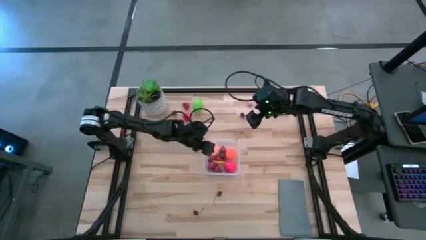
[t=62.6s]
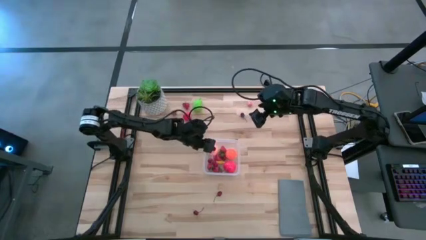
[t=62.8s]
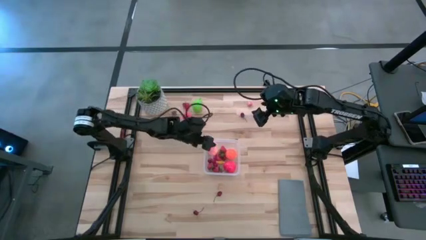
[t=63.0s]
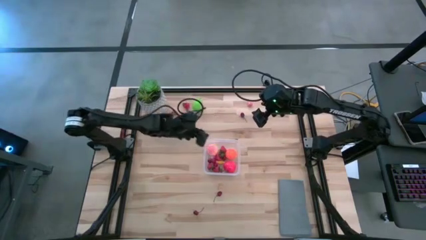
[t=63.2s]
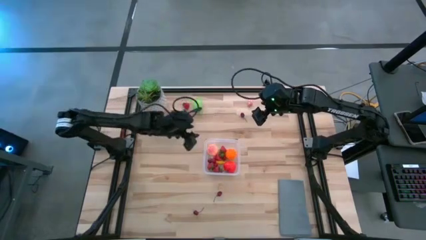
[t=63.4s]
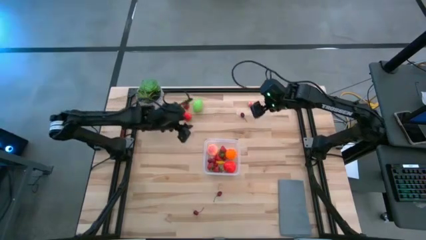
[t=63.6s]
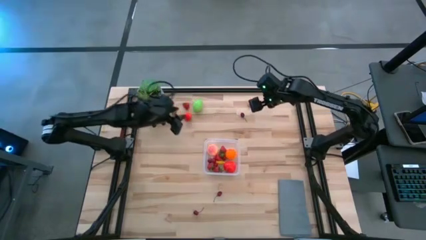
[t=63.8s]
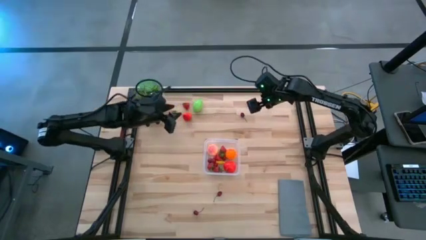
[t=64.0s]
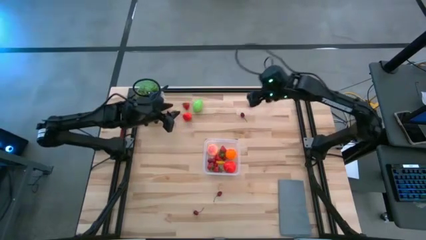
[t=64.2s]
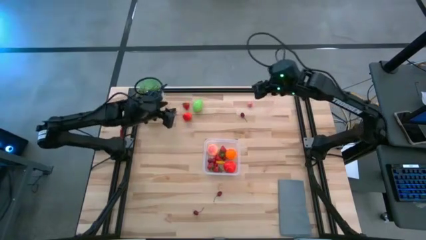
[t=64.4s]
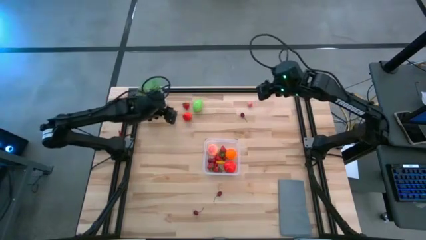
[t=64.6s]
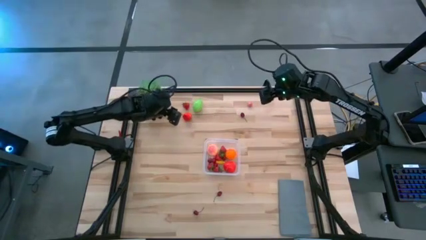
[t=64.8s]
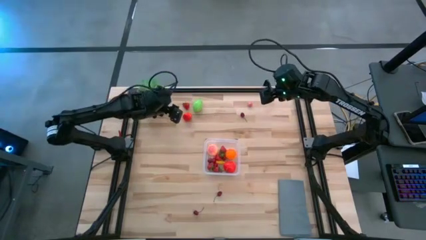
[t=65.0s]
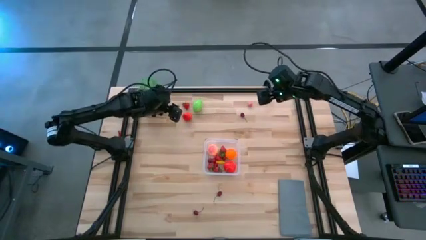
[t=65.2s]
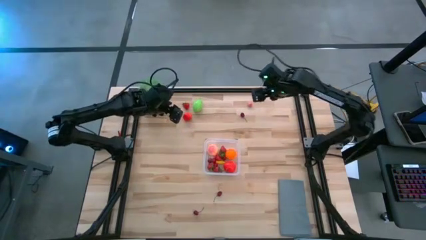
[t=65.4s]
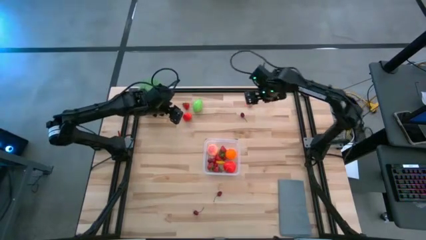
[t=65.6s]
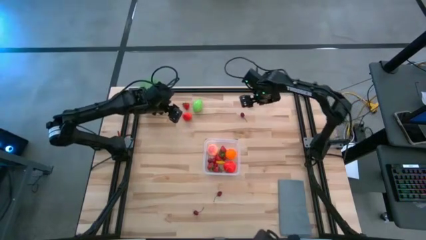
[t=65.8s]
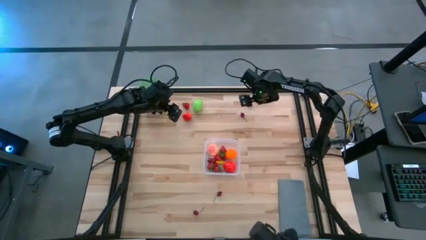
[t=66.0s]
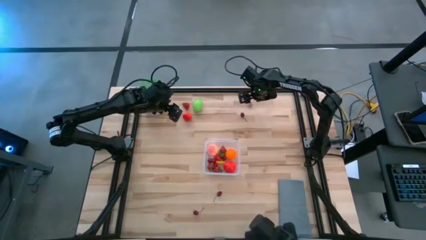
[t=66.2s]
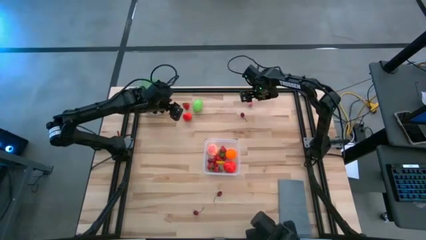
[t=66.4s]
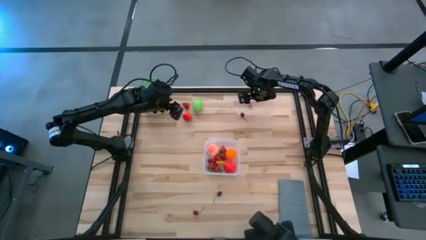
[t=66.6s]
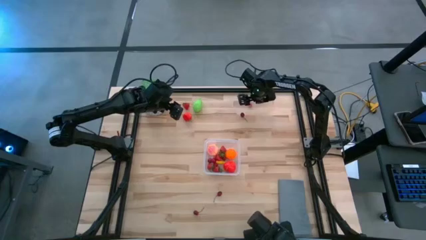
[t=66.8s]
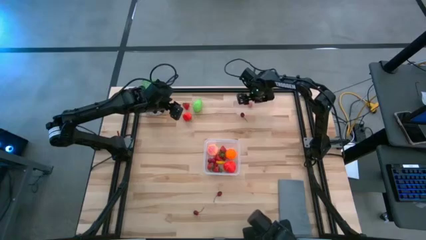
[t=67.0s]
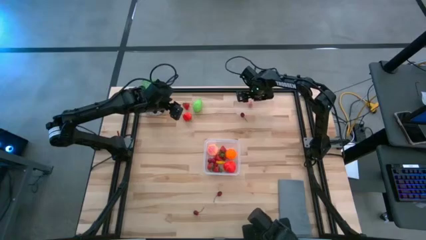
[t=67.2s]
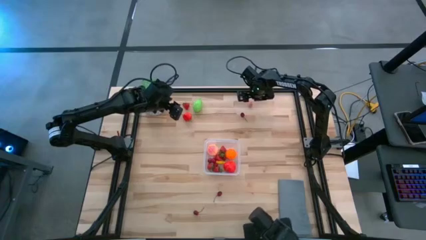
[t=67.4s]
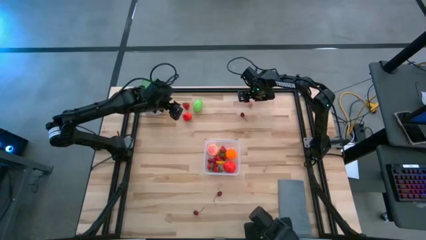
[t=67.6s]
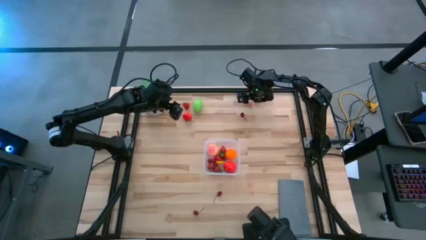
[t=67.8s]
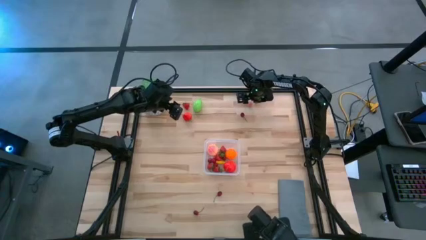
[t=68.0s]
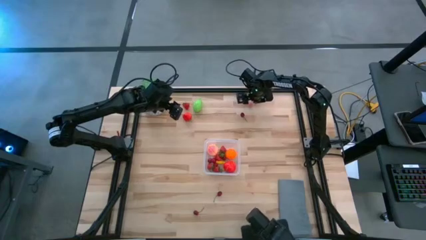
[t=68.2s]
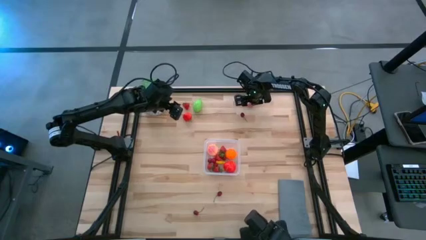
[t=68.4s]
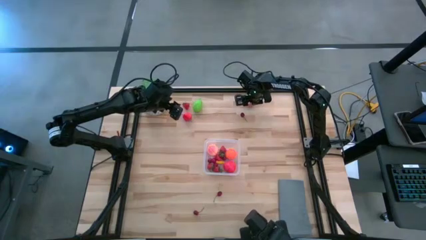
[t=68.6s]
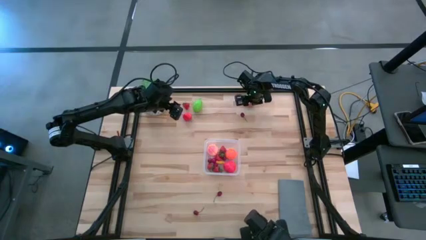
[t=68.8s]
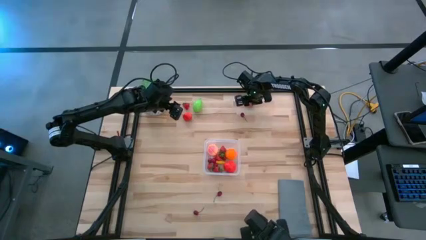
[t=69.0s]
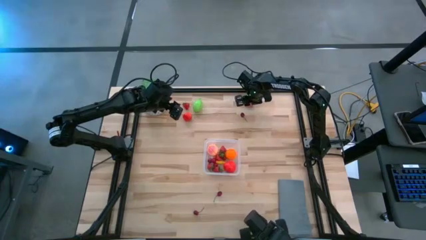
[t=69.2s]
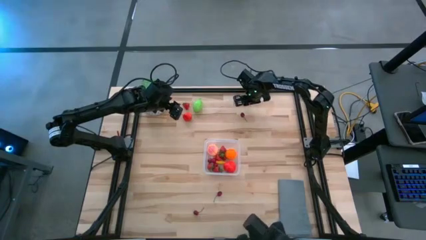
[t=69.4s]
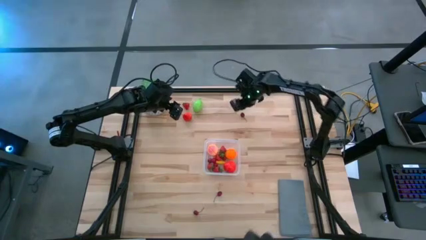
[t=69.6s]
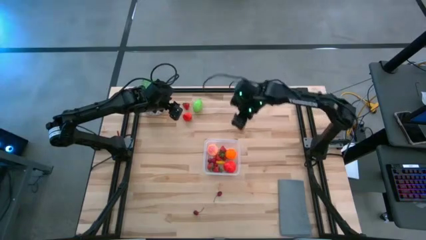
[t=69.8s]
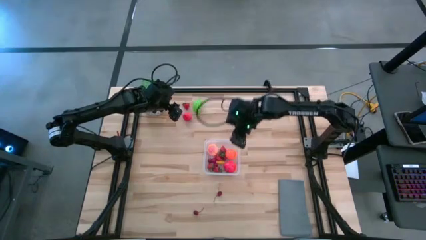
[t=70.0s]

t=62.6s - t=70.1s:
Task: Pick and placing Produce into tupperware
Put the pink peach into the transparent container

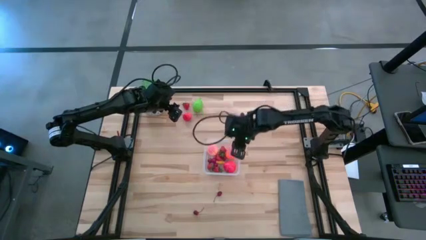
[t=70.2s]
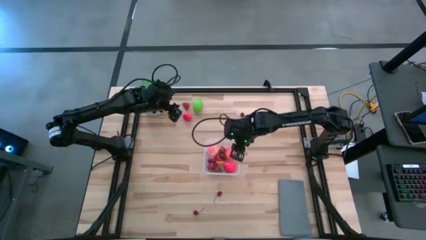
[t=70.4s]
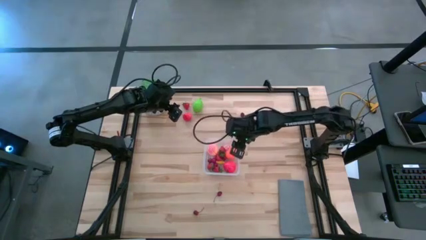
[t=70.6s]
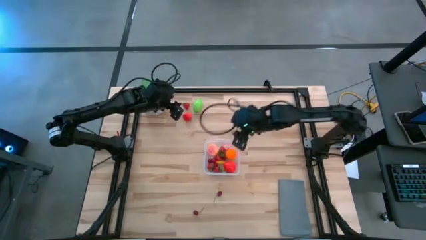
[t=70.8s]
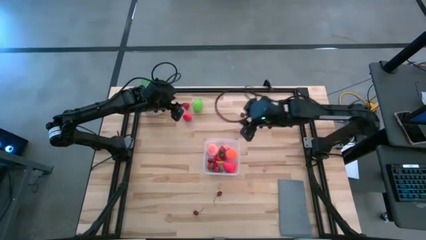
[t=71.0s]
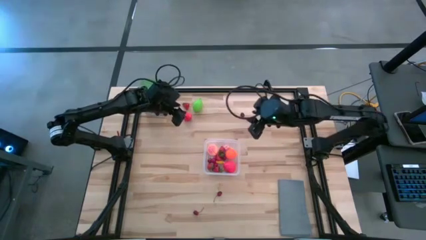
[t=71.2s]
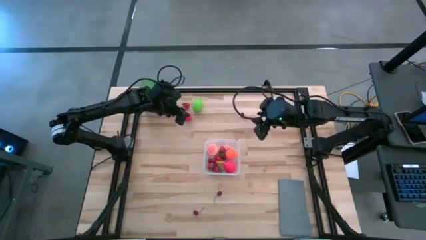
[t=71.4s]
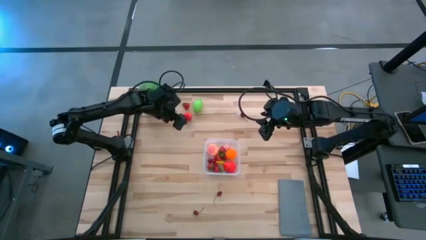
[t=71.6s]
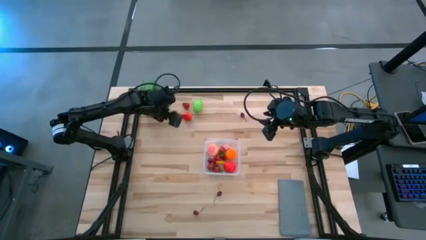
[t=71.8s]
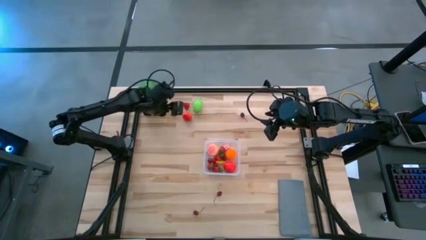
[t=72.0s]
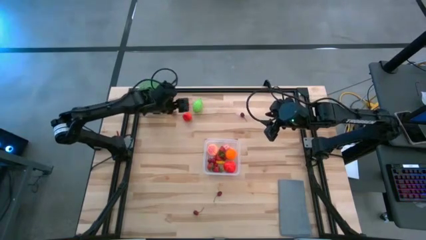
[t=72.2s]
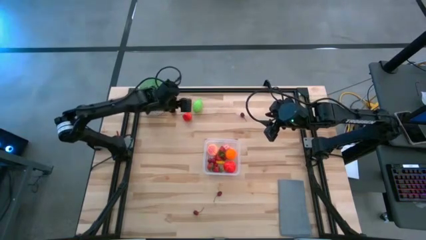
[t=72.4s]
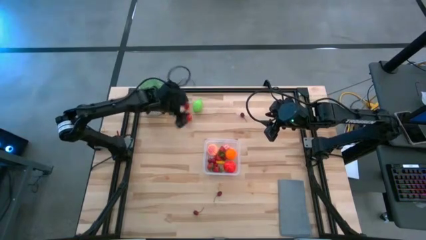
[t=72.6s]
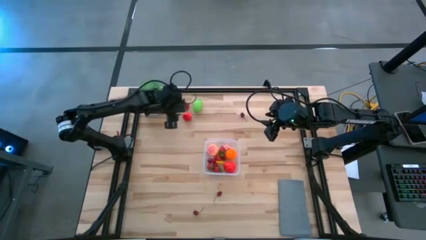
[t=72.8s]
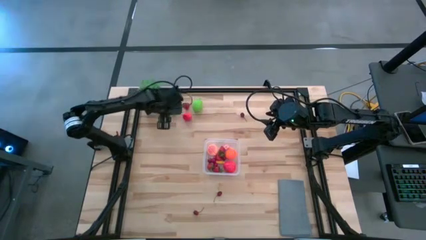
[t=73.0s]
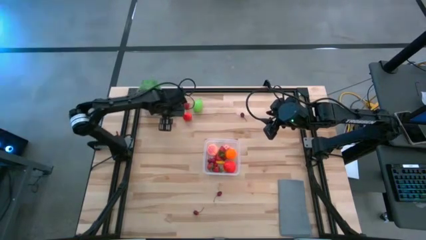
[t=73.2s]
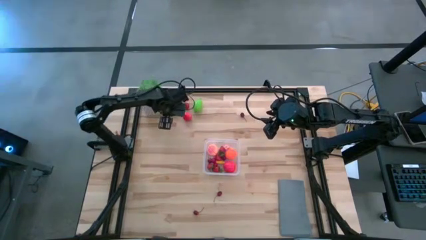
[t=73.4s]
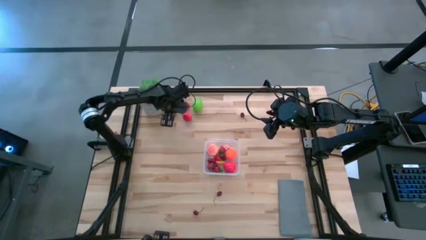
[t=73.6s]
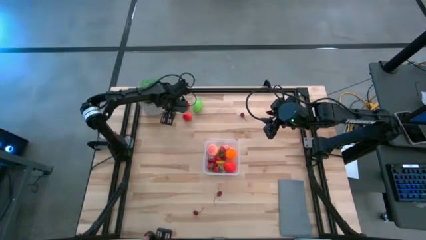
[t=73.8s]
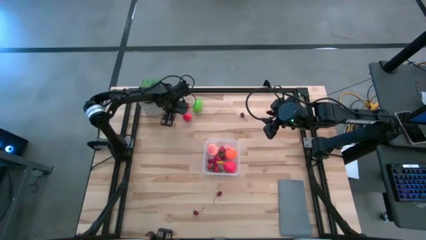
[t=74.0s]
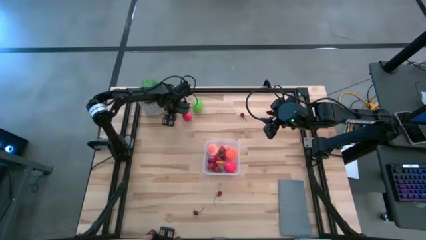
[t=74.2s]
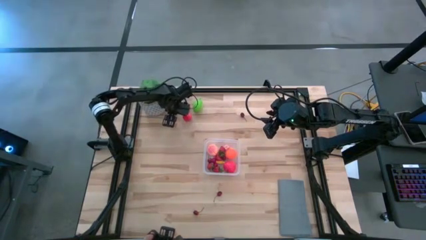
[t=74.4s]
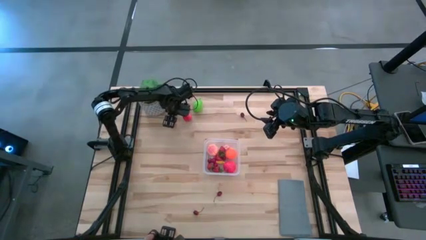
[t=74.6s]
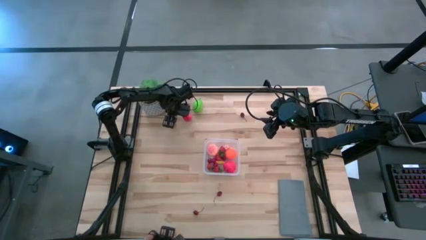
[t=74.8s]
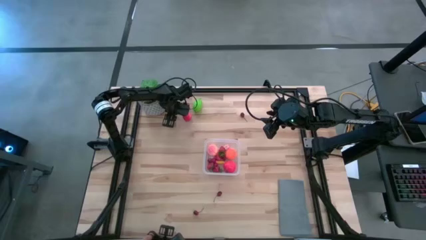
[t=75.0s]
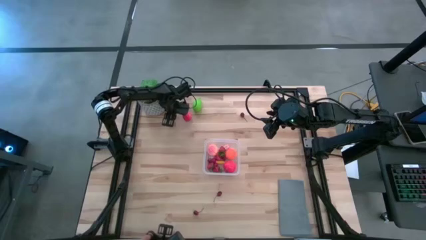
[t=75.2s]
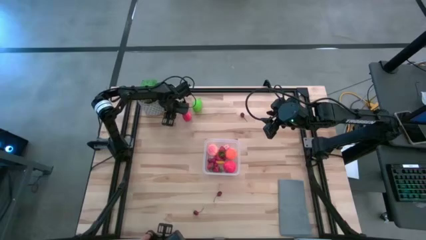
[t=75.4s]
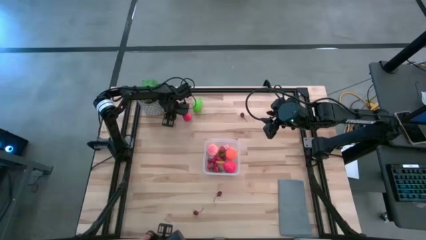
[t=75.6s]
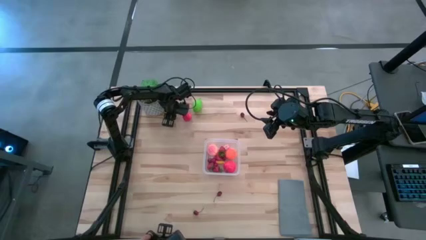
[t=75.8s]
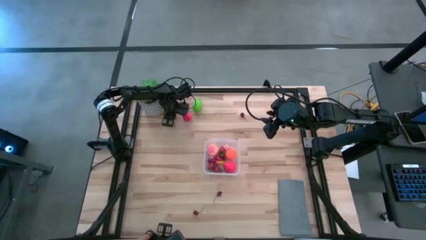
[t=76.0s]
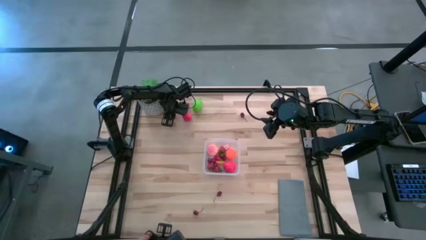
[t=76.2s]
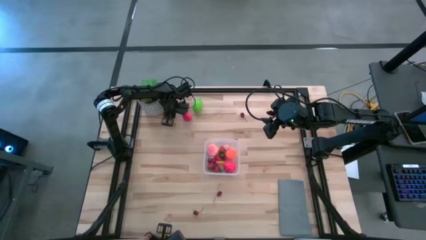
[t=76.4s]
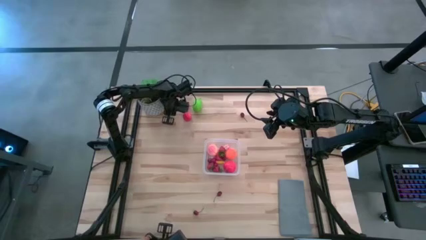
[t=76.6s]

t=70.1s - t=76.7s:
Put the red strawberry into the transparent container
